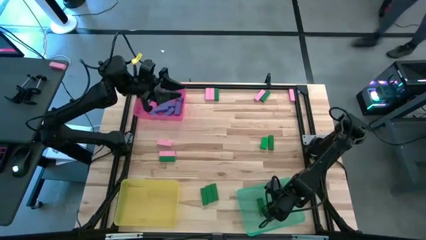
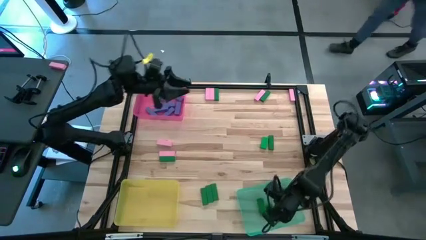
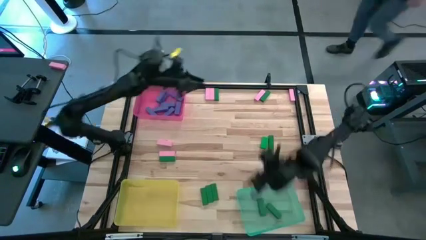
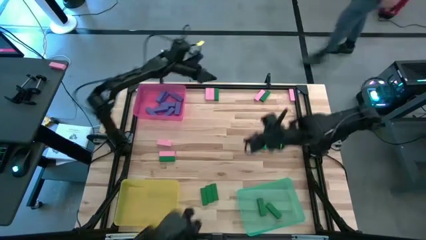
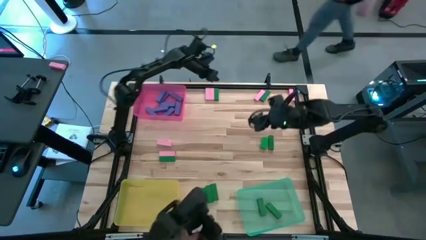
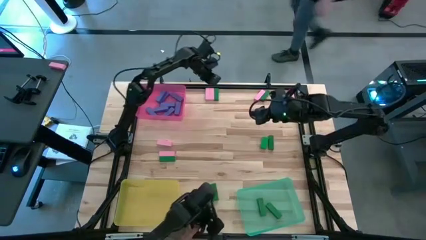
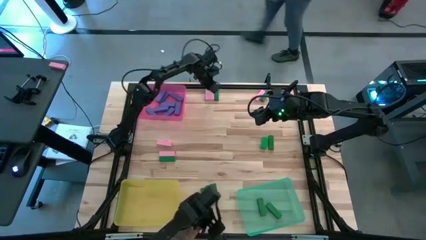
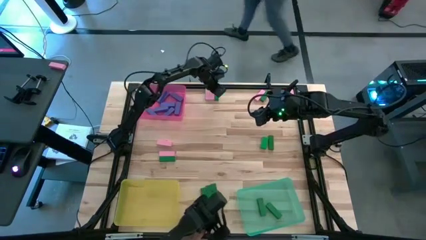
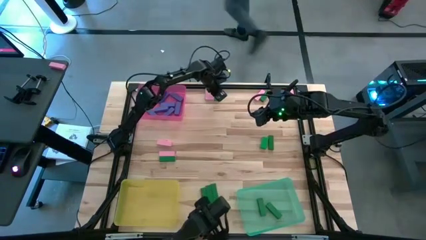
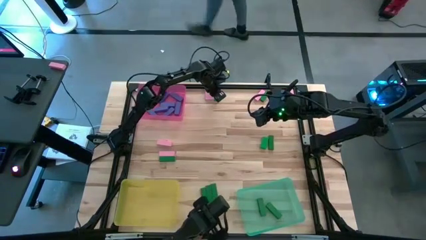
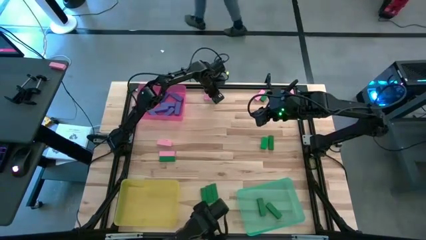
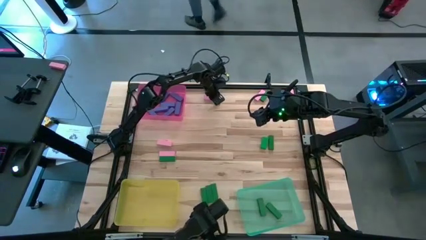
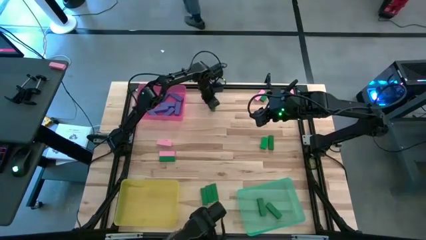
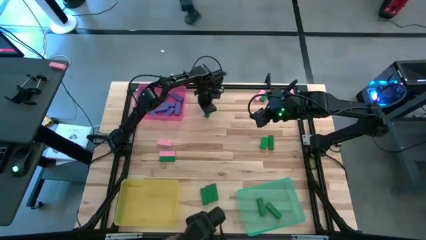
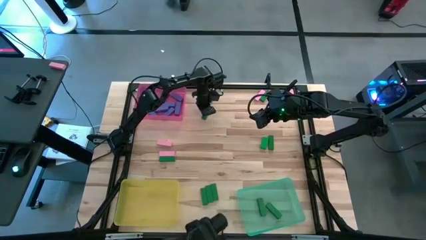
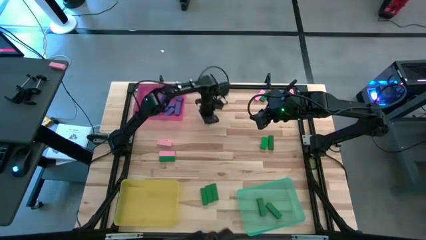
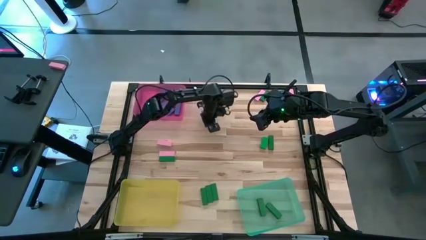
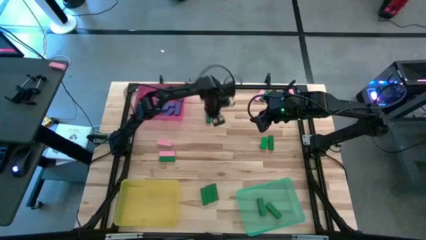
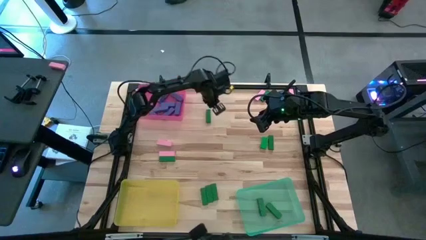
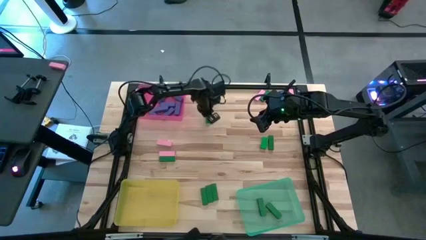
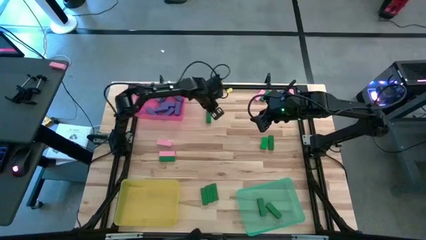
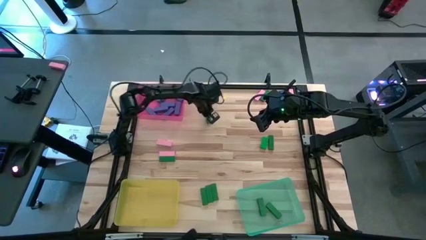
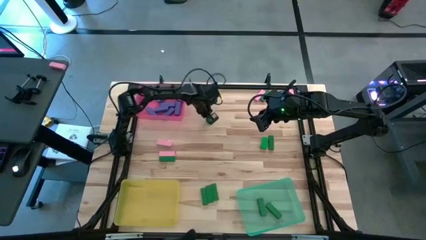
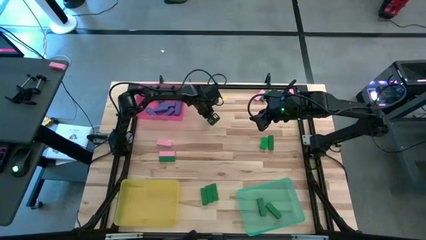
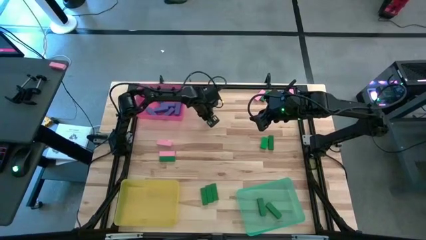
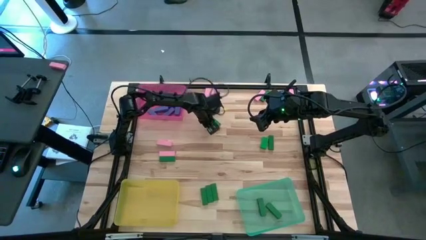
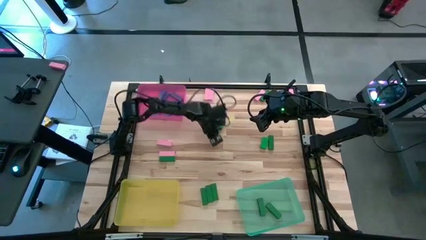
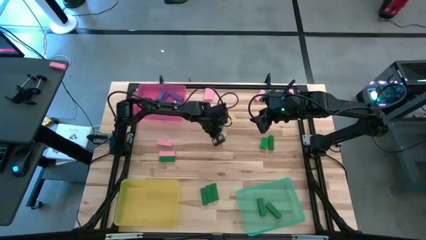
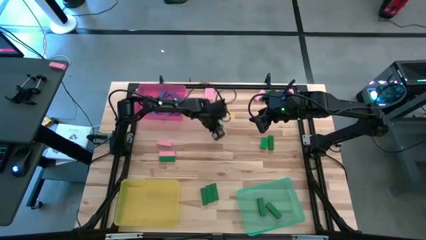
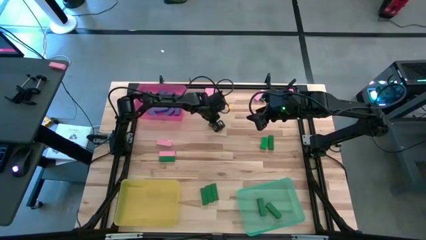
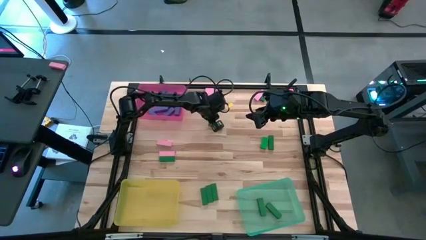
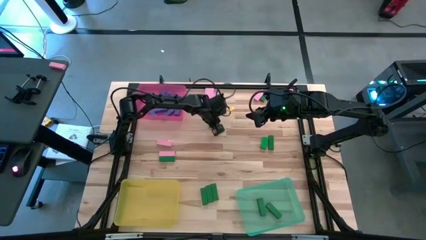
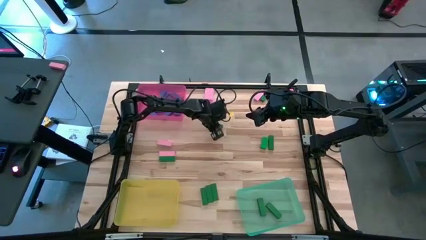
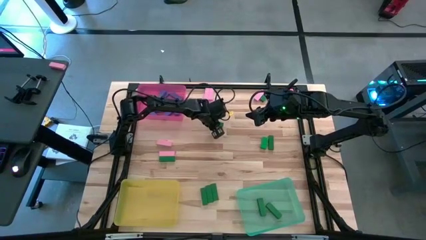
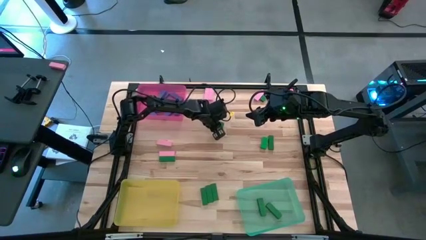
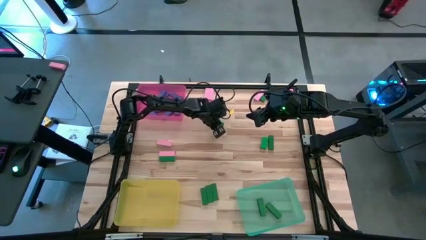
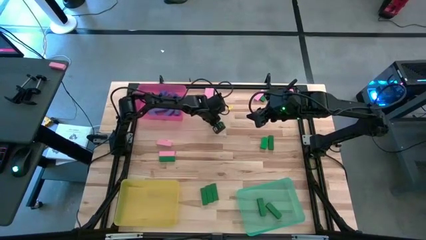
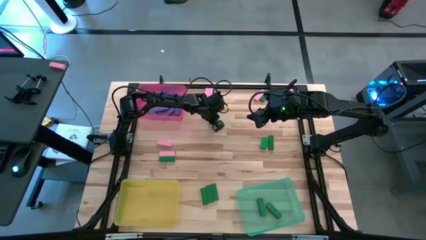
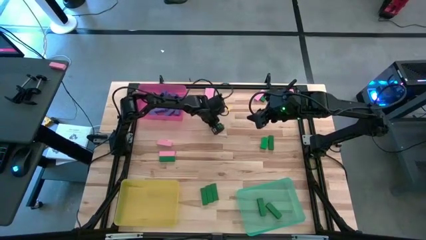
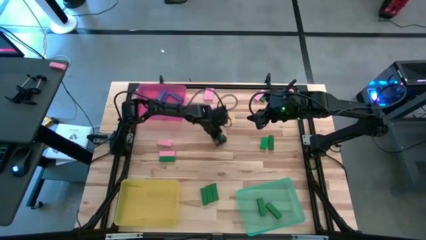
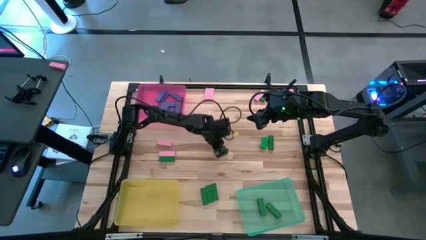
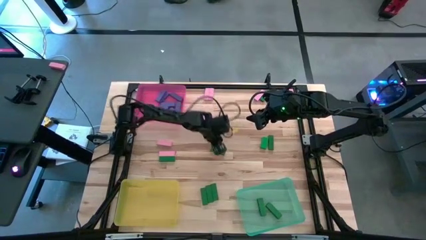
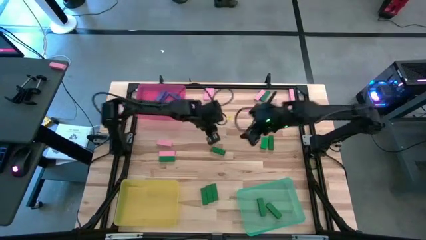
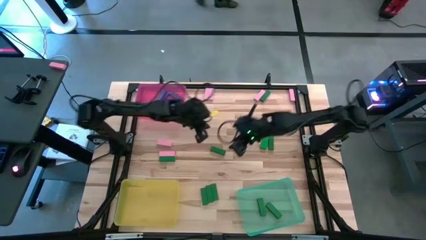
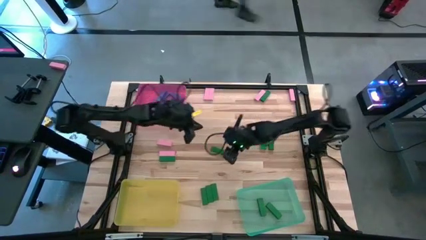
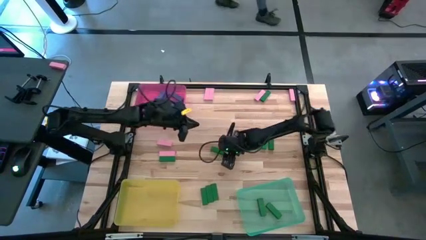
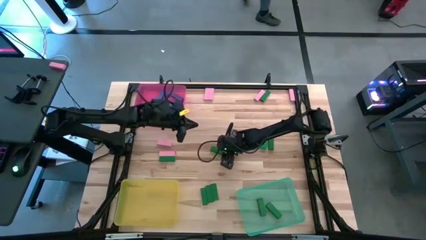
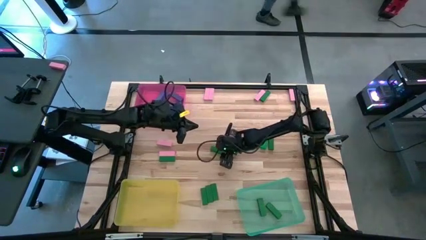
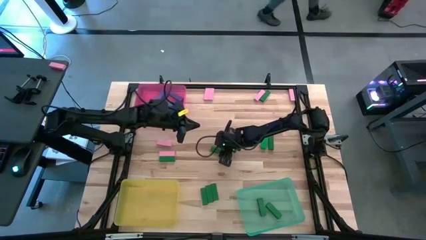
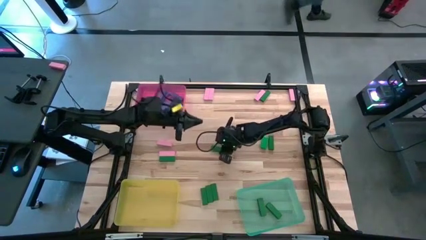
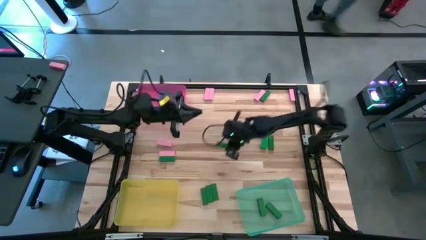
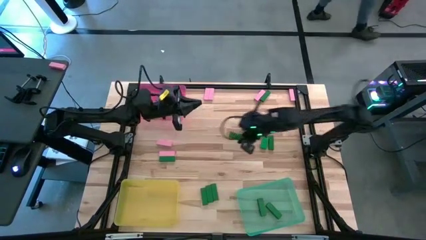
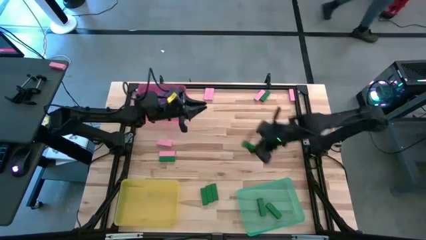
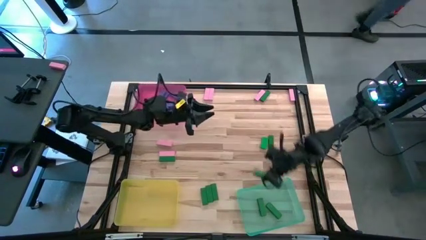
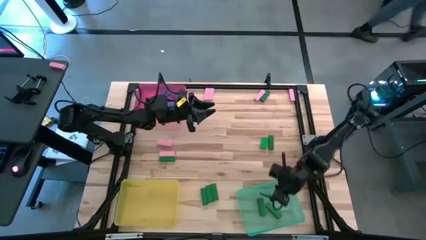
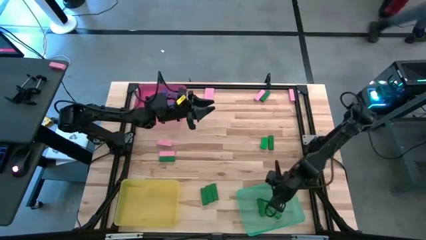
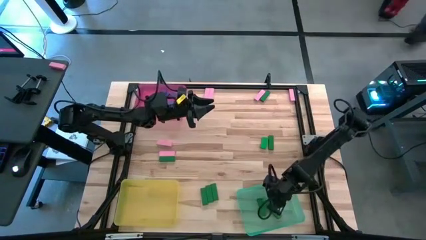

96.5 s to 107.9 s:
Task: Sort blocks
Put the green block into the light green bin

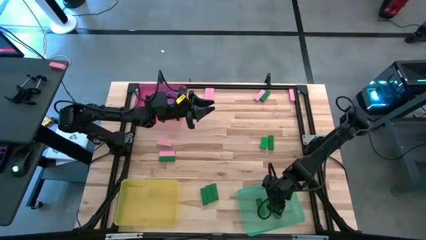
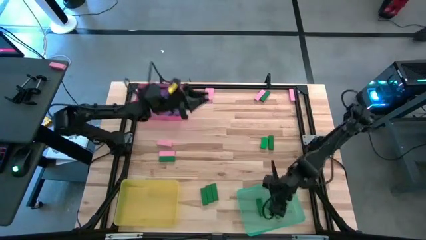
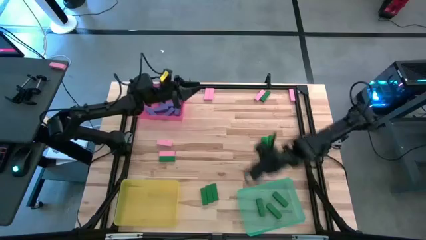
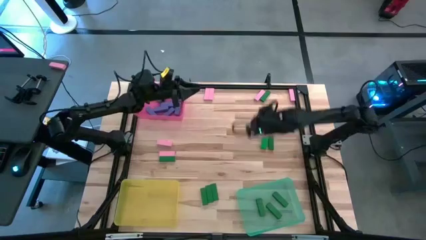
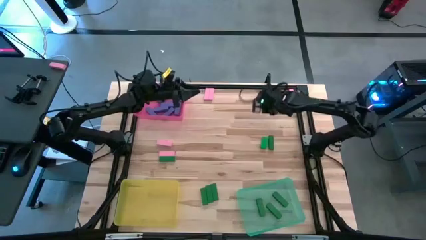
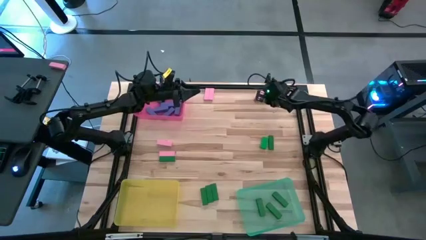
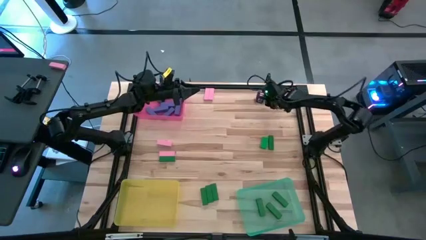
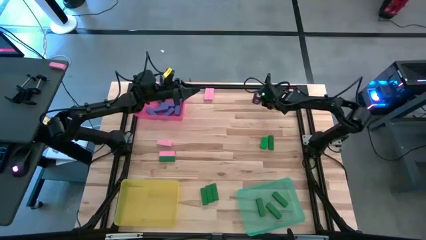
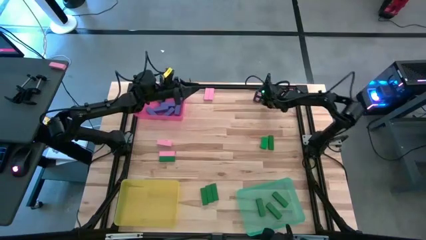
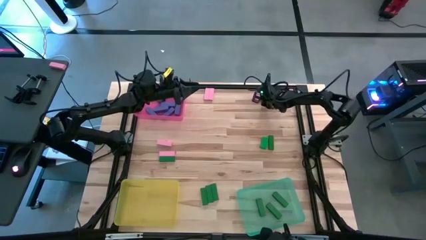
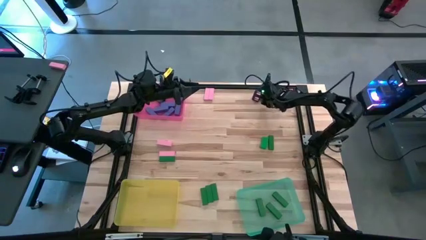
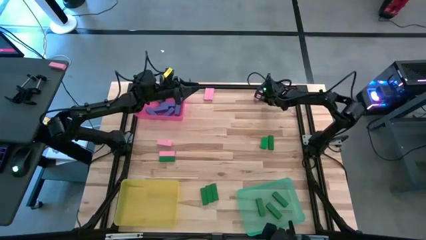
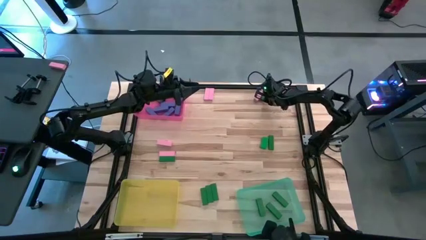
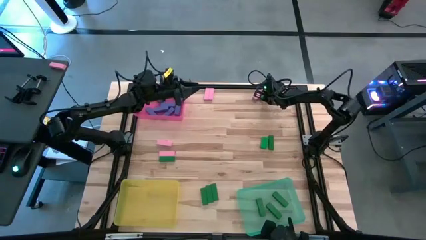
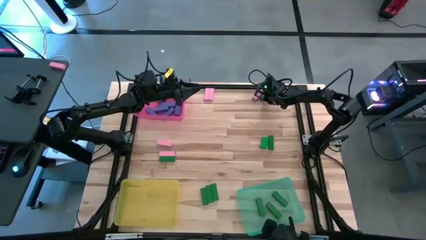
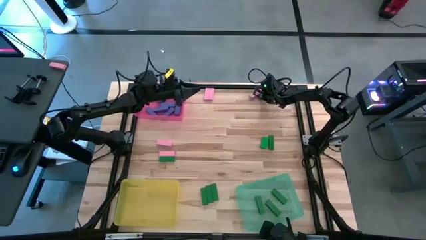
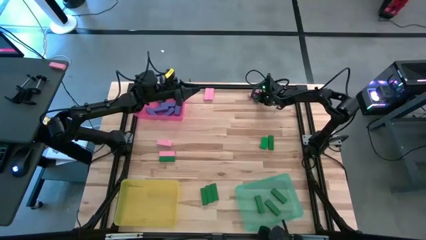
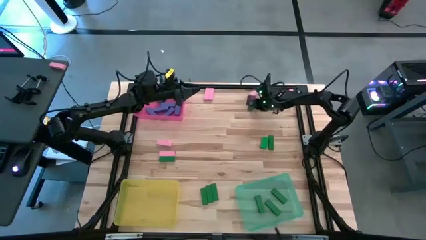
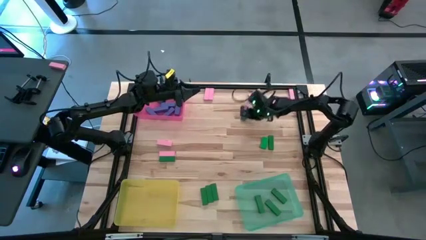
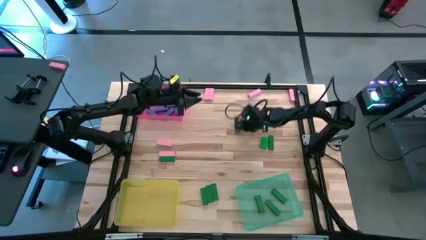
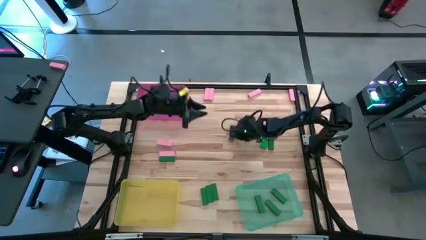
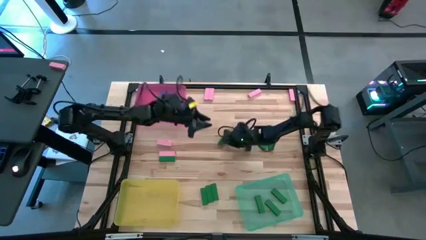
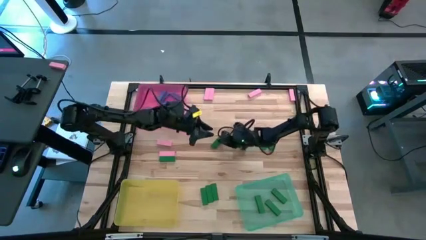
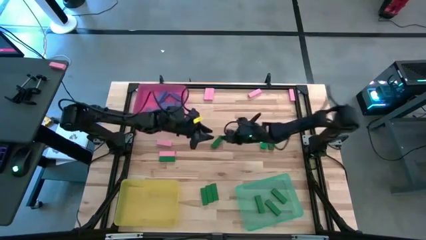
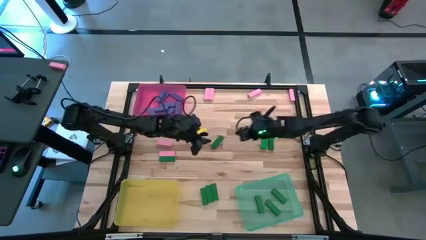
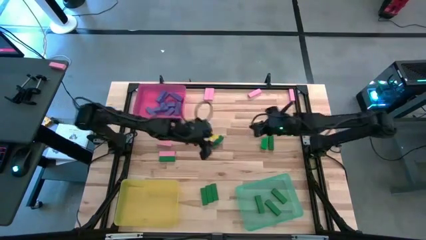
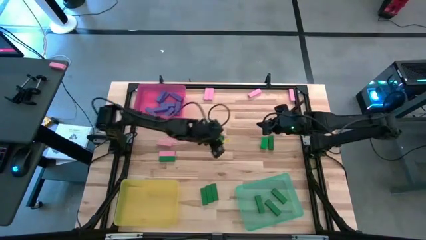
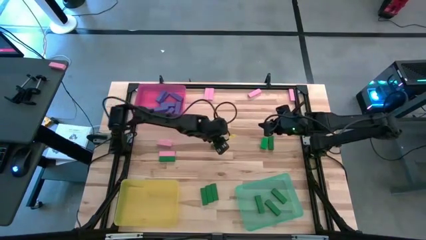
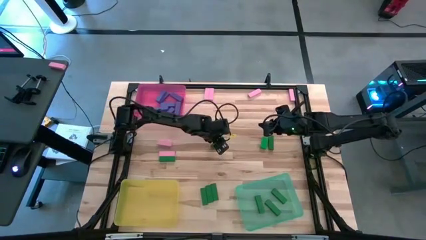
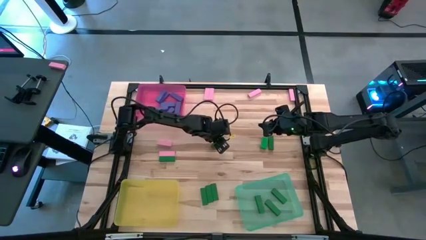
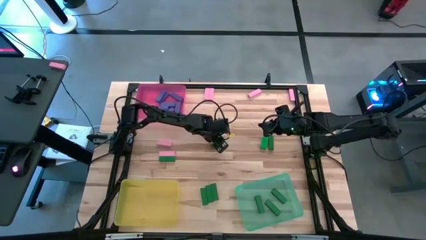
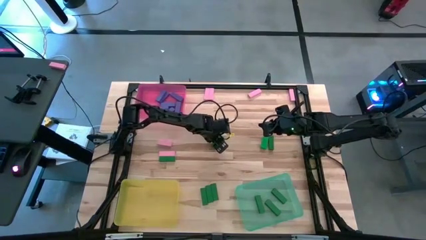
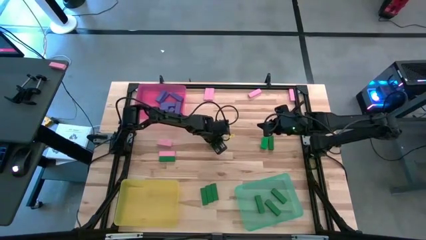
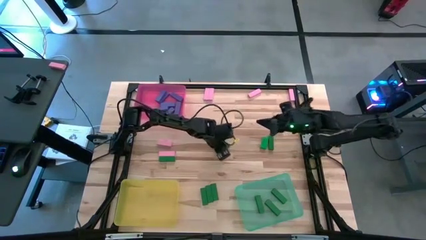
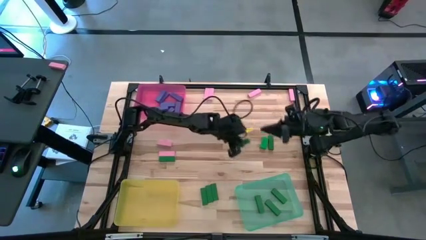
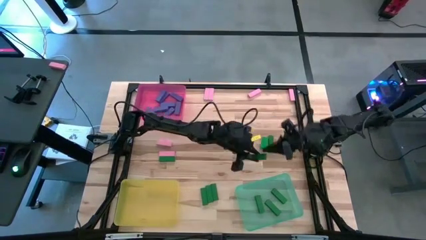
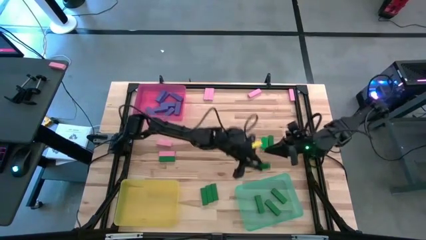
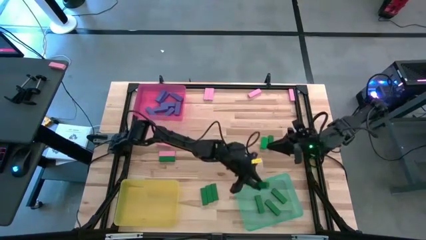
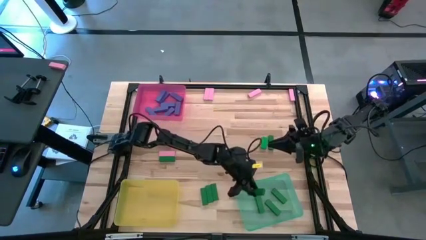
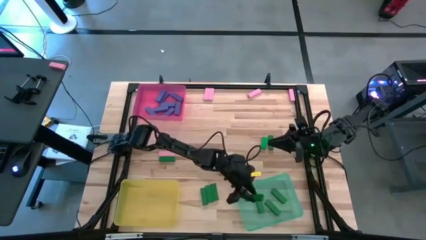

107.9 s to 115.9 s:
Put the green block into the light green bin
